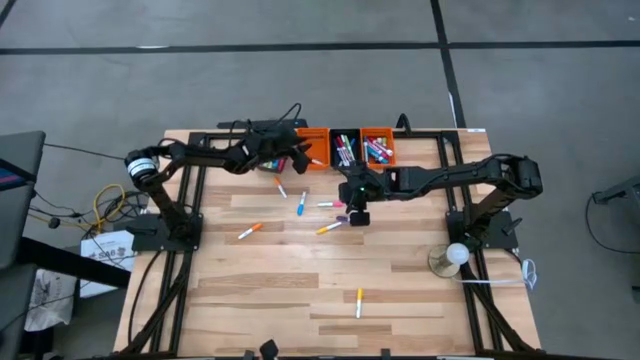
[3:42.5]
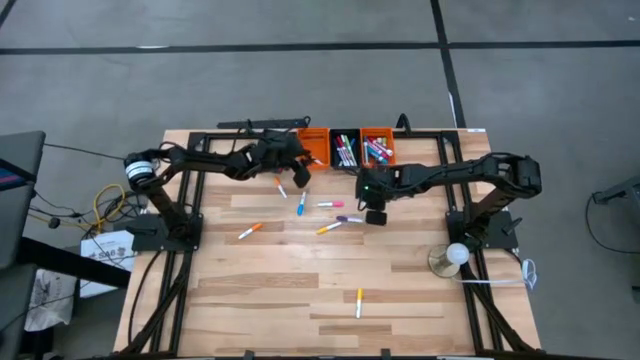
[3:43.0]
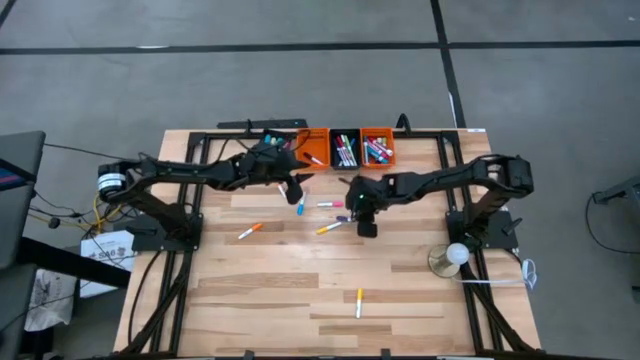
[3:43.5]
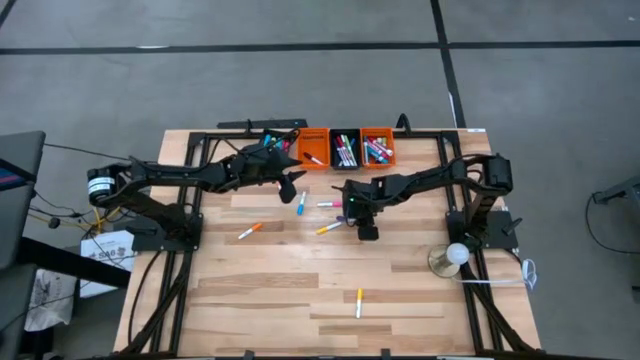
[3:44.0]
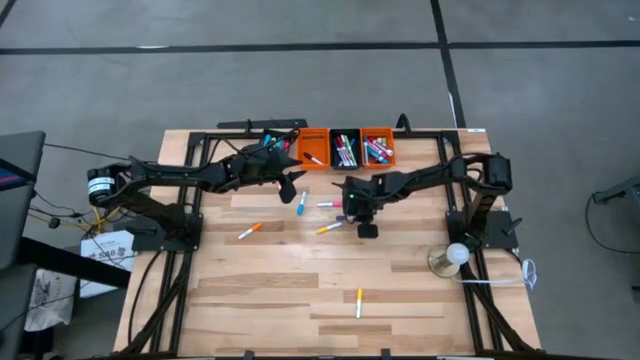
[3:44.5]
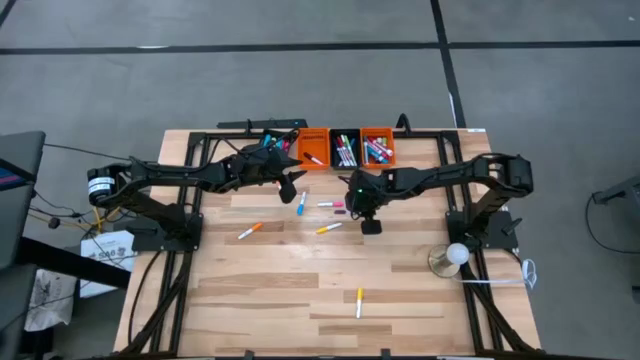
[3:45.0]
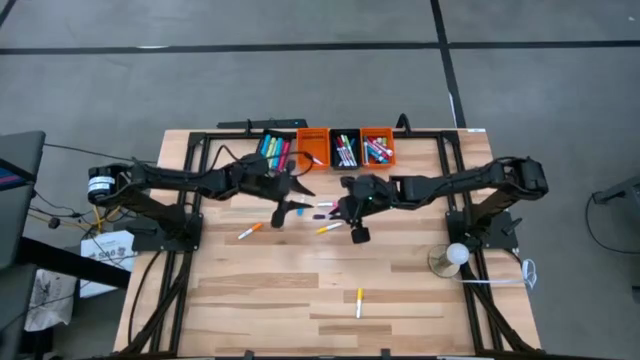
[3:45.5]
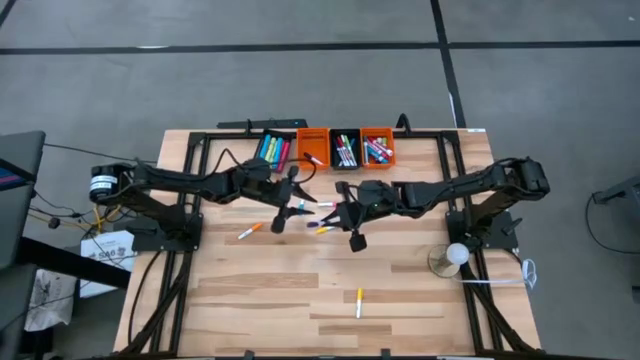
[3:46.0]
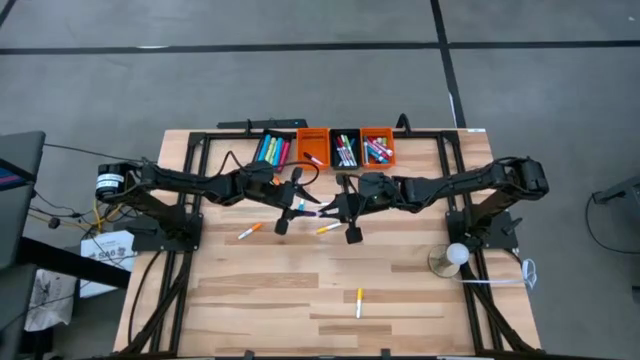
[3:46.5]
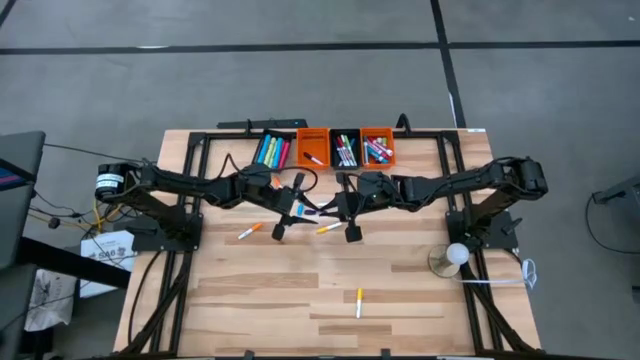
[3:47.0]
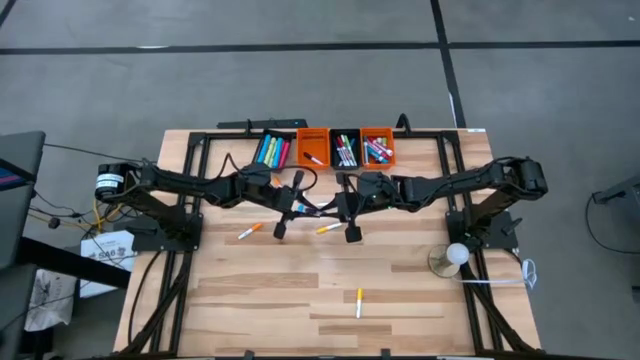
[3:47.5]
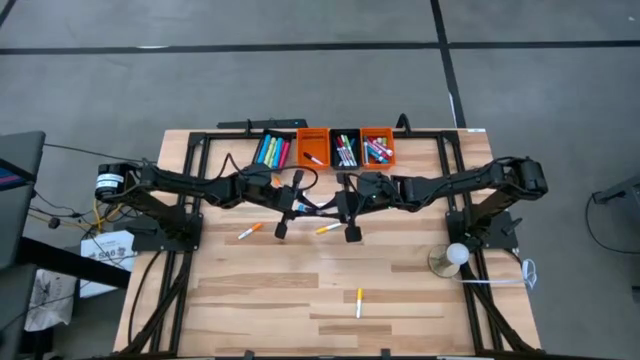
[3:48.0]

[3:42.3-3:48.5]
Task: Pick & Place Markers
Put the small violet highlighter pen into the left orange basket

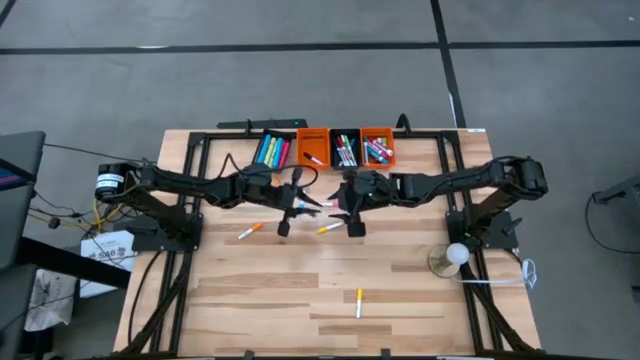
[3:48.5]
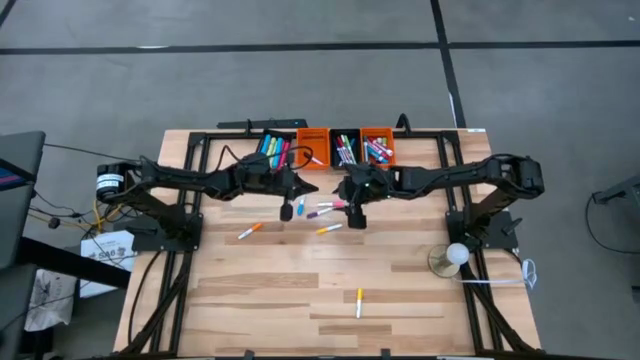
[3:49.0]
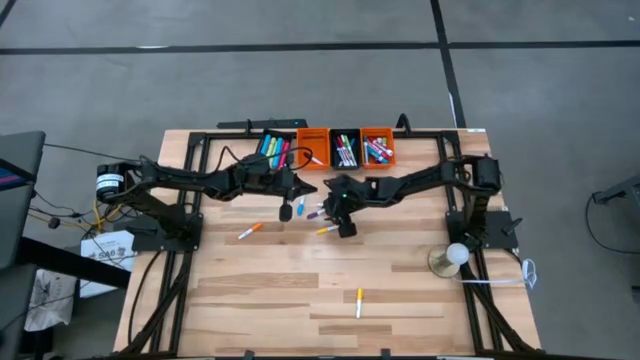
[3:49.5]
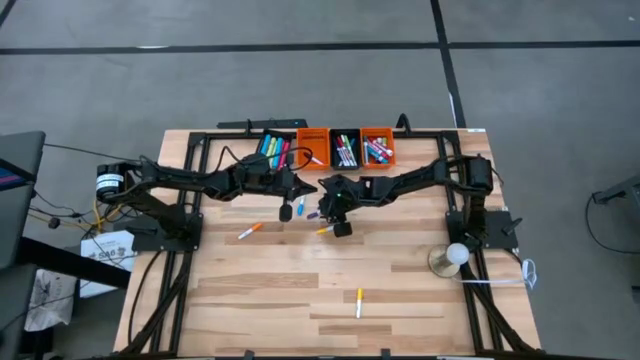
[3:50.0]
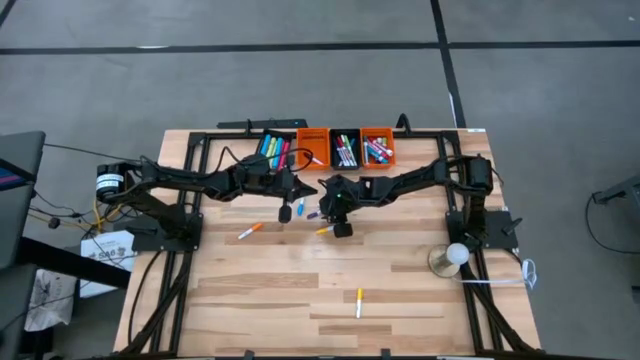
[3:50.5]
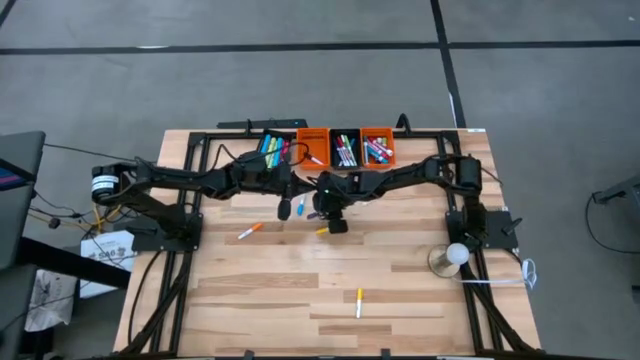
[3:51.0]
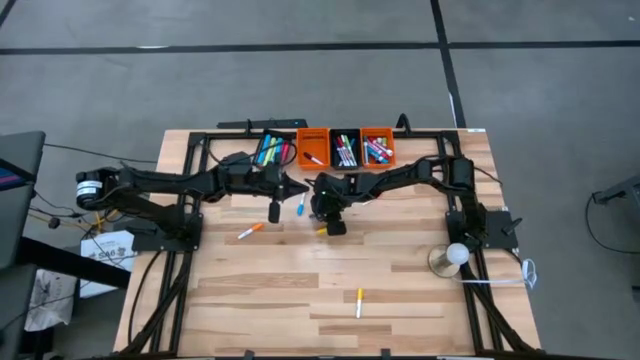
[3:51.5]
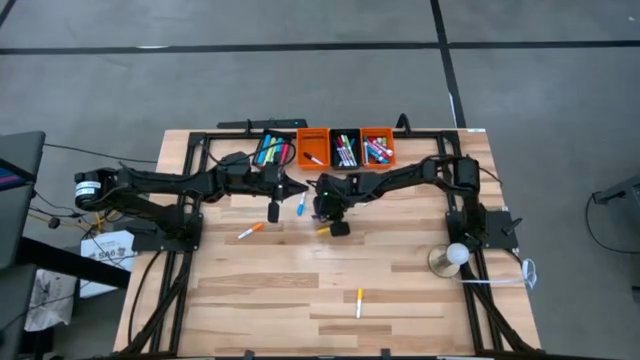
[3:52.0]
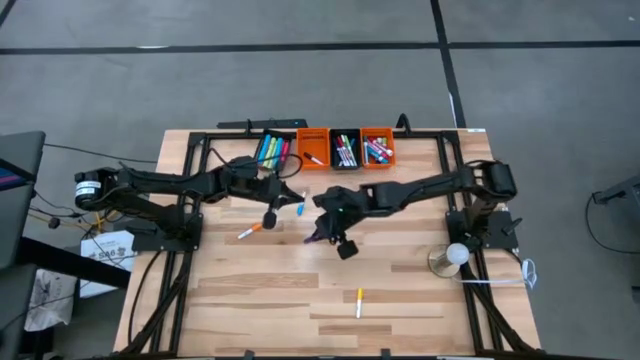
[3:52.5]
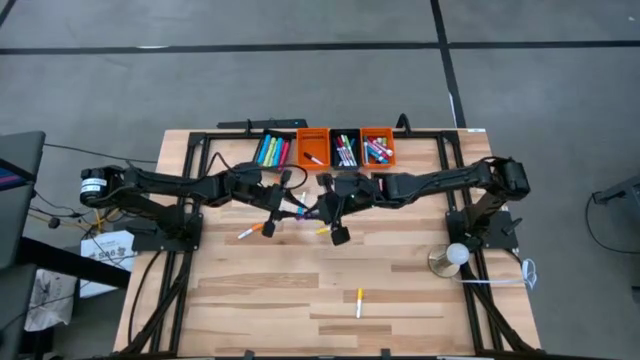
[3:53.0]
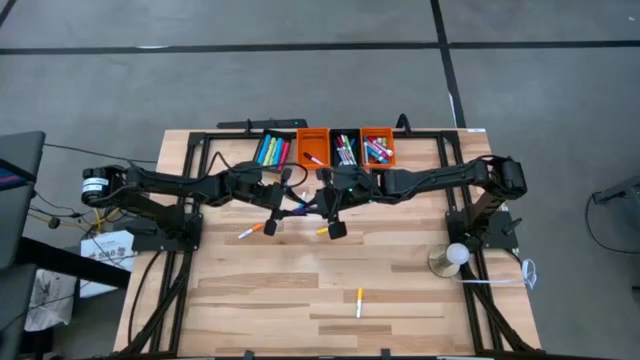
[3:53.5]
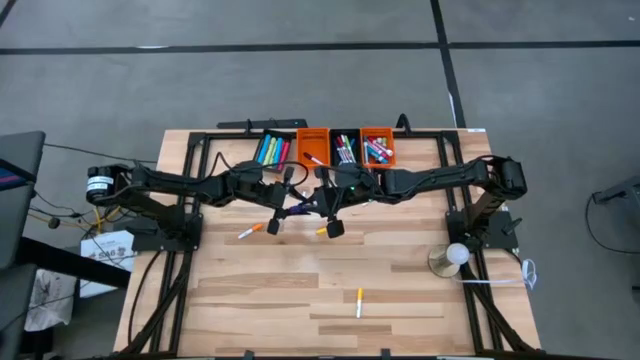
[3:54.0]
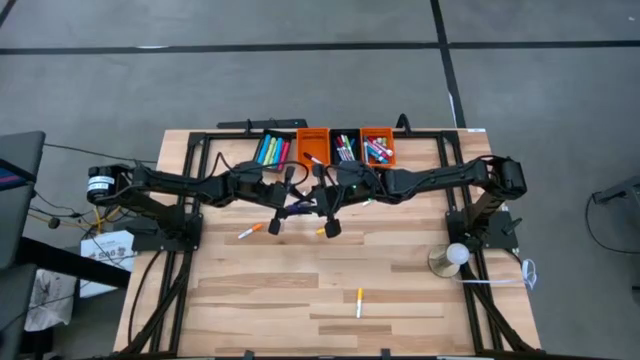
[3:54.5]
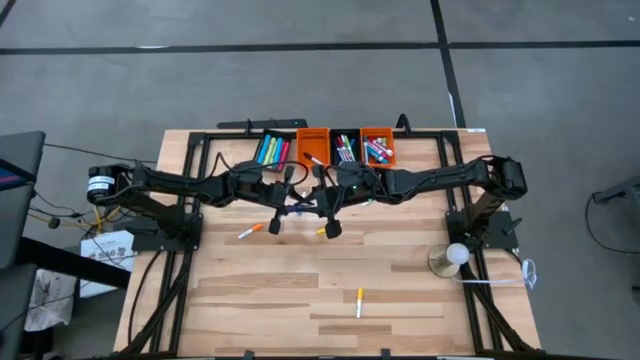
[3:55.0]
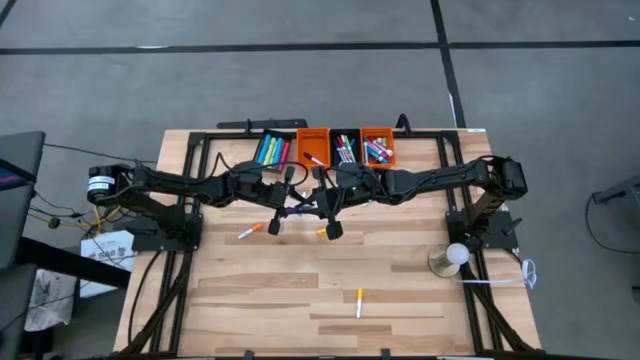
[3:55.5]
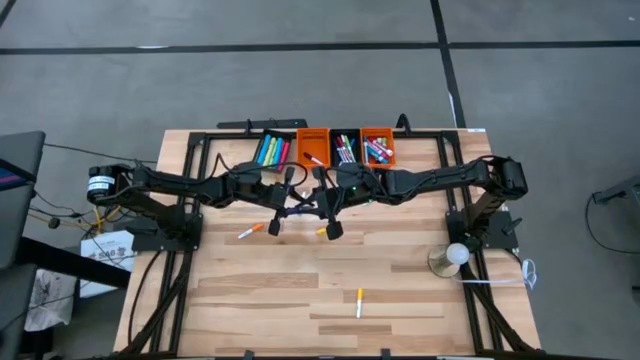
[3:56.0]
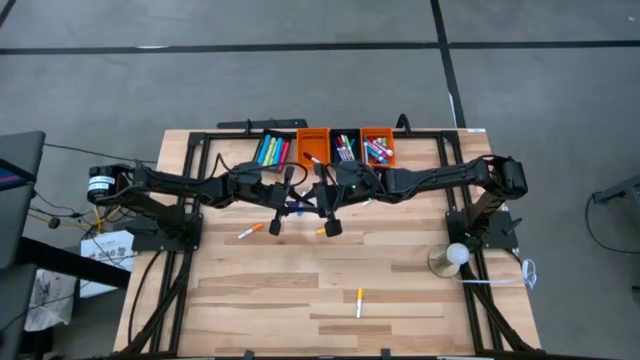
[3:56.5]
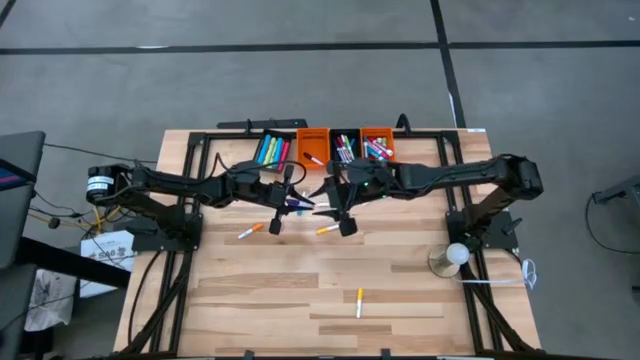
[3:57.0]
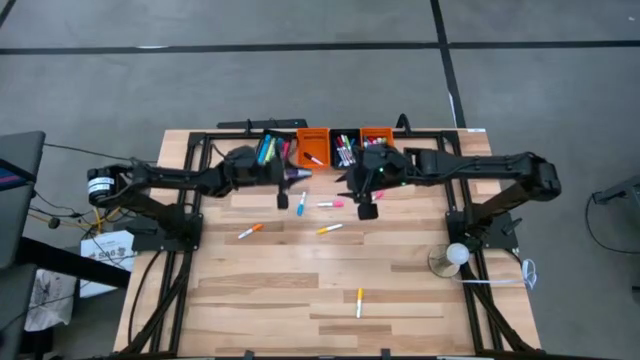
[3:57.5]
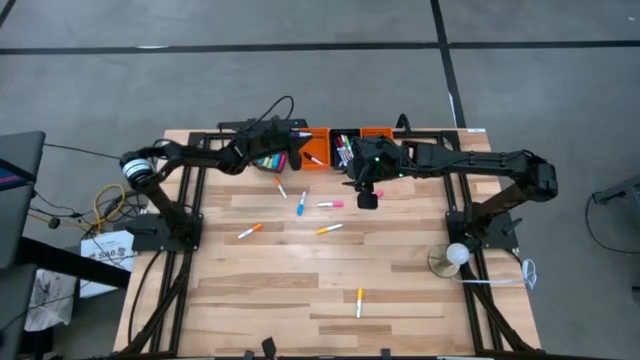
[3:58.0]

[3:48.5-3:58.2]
Put the small violet highlighter pen into the left orange basket

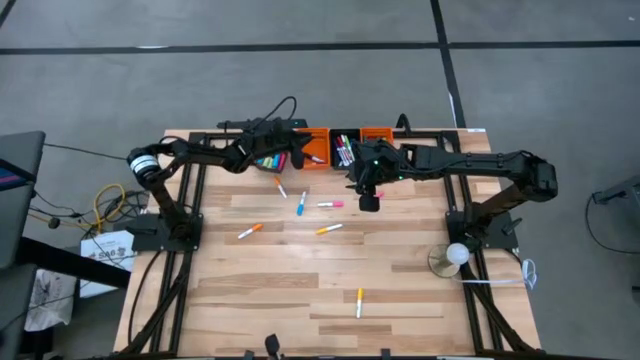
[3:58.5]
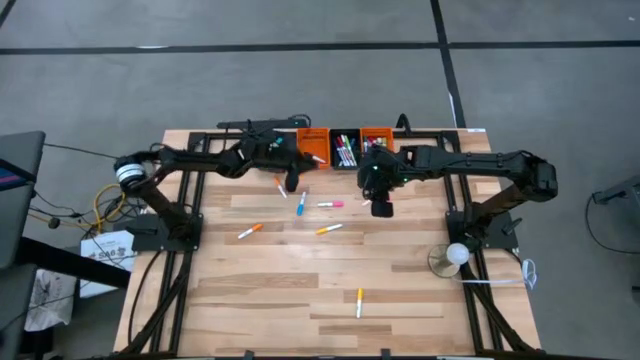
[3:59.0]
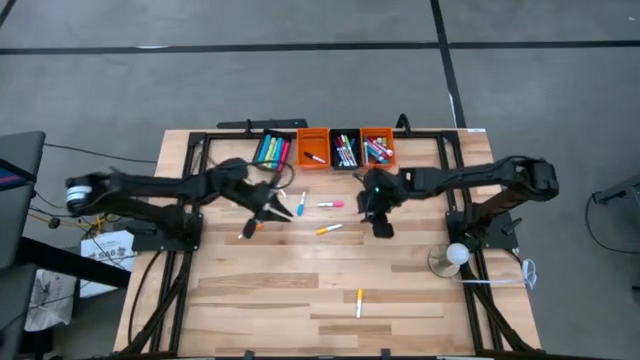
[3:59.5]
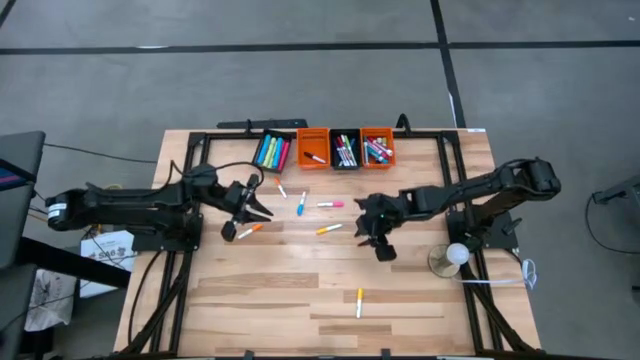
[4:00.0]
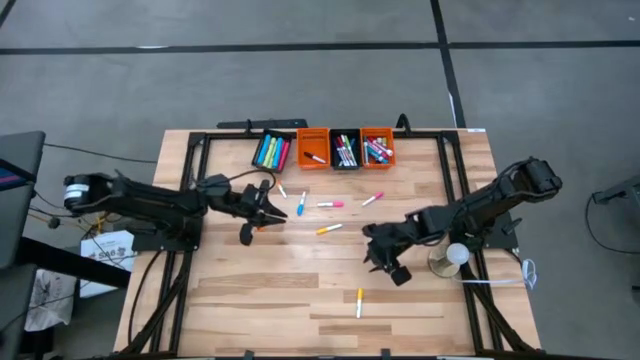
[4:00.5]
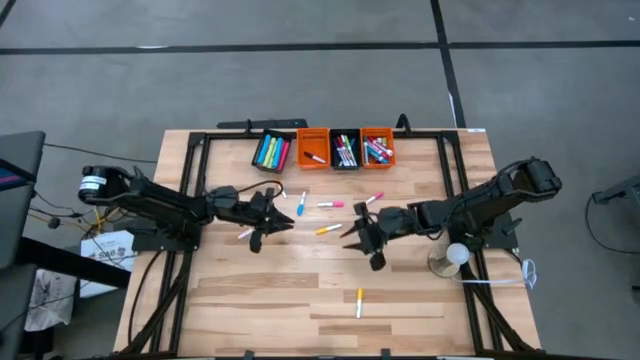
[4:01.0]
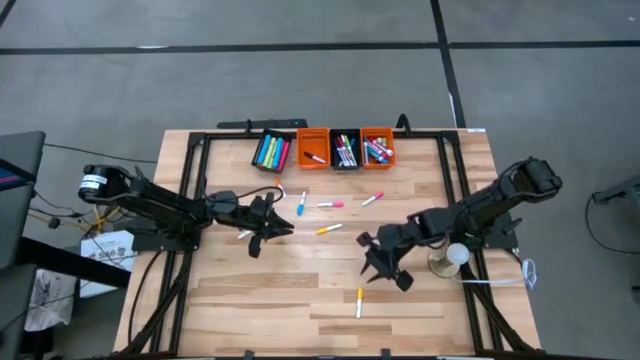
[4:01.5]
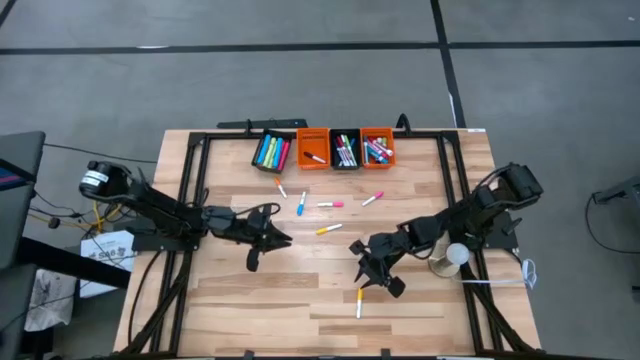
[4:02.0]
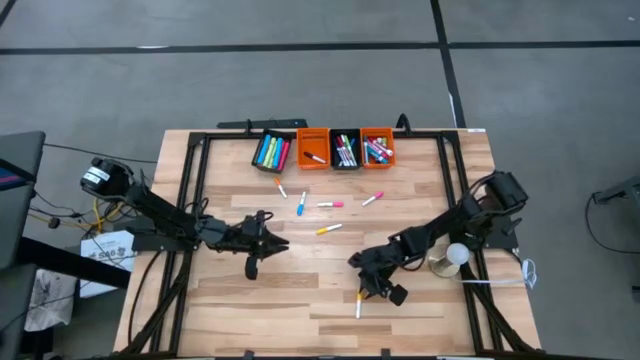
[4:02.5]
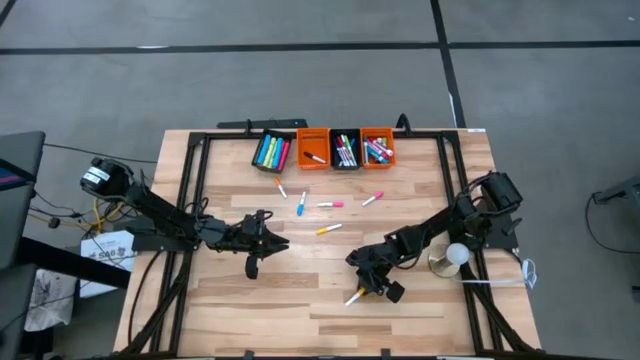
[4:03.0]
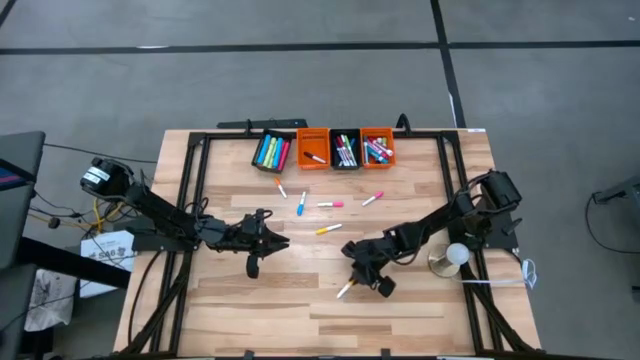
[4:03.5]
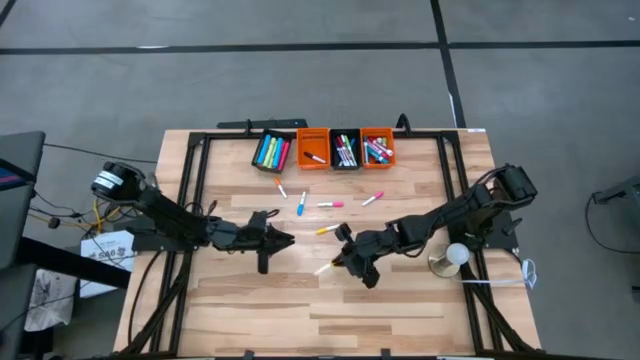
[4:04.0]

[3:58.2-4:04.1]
Put the small yellow highlighter pen into the left orange basket
